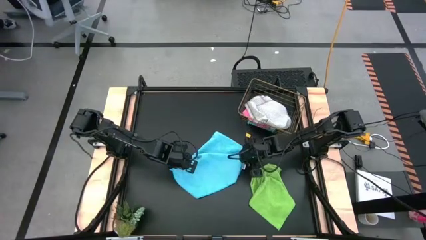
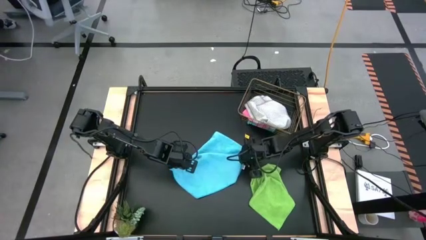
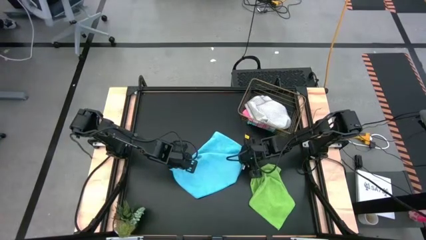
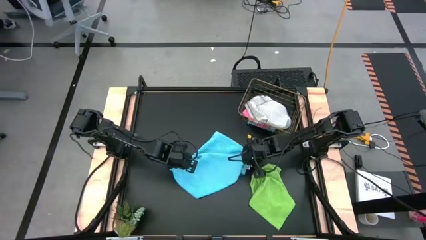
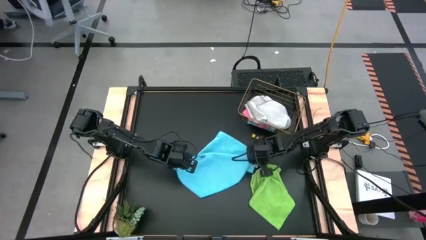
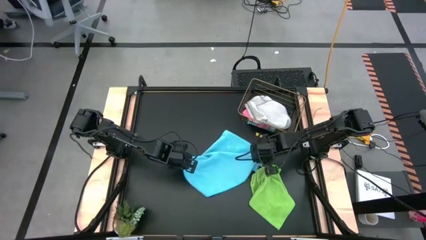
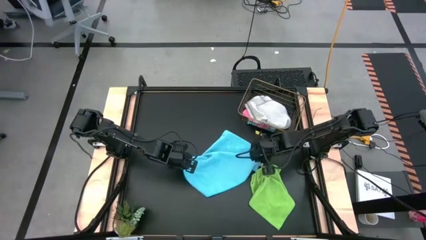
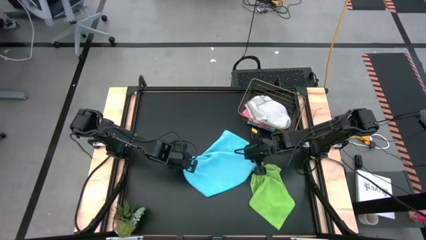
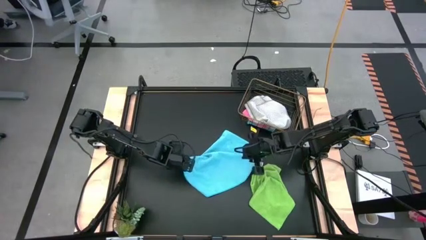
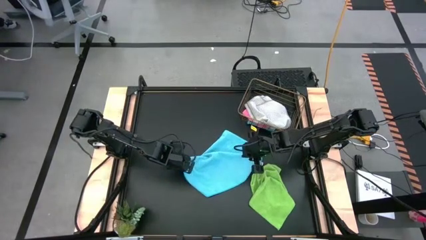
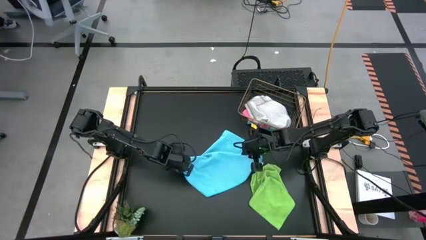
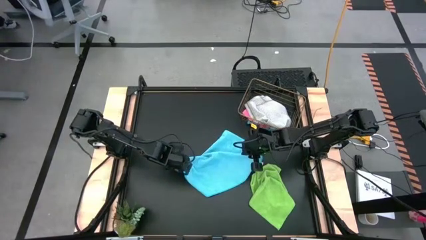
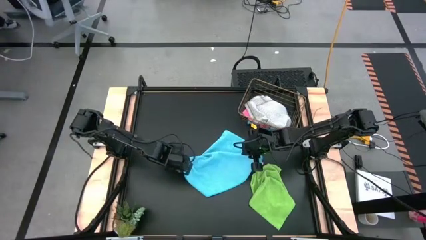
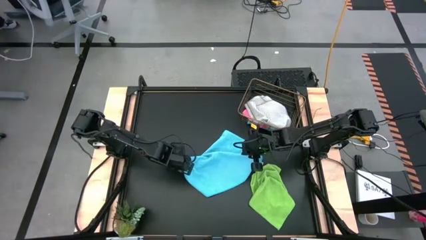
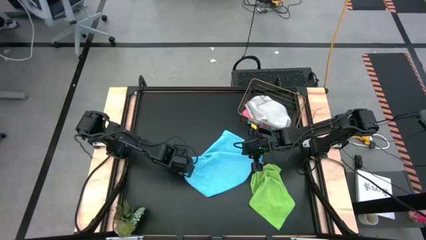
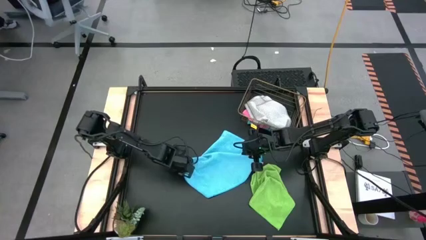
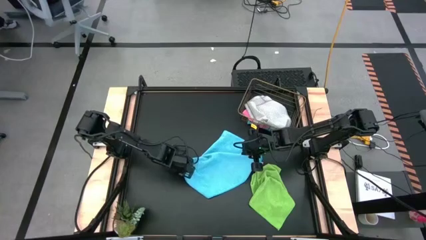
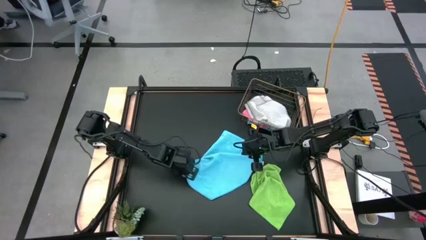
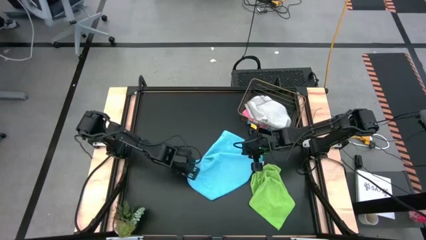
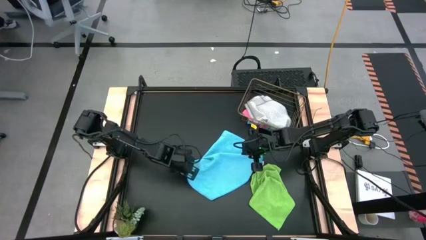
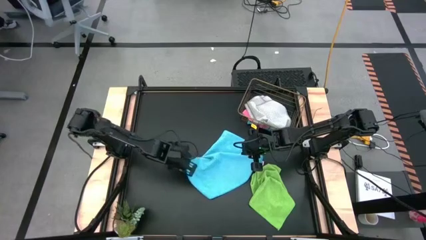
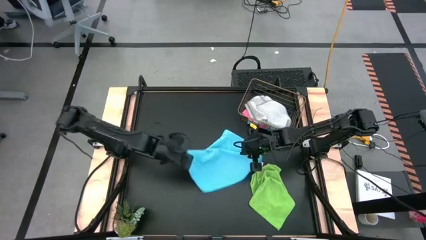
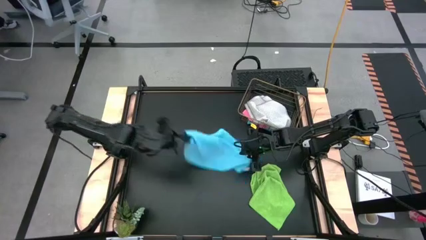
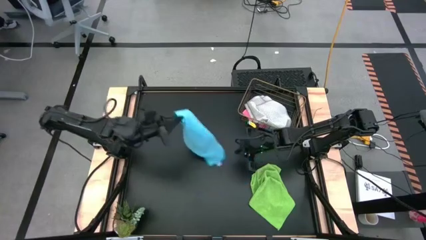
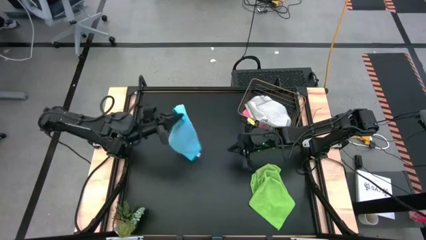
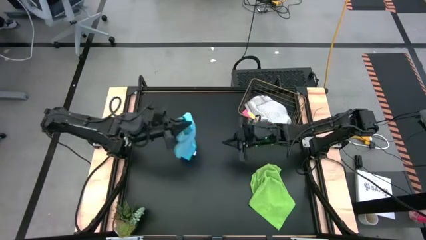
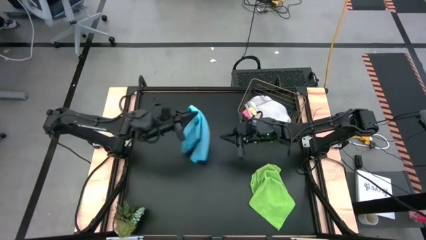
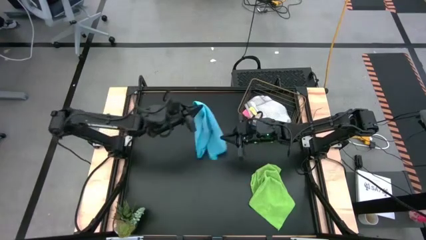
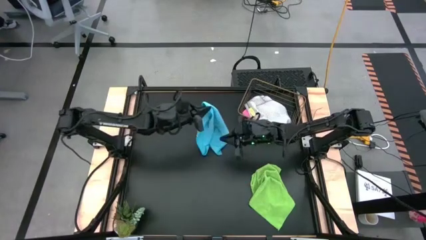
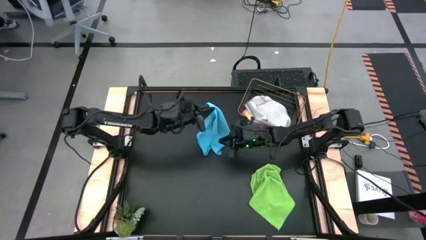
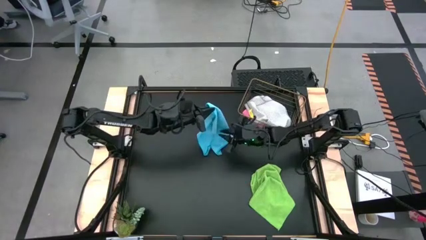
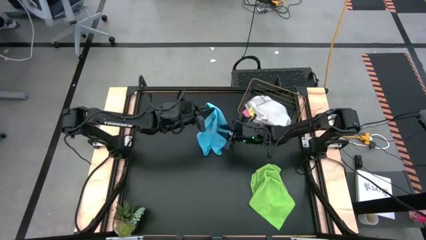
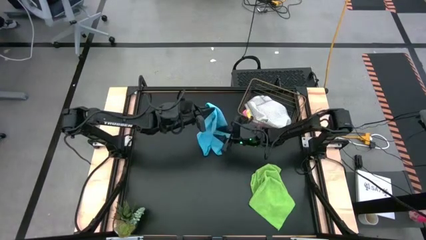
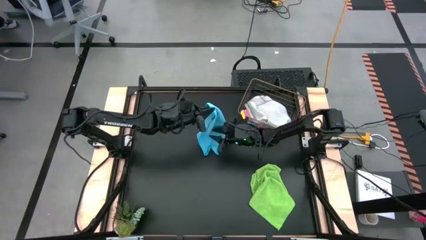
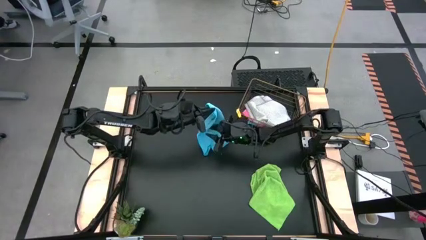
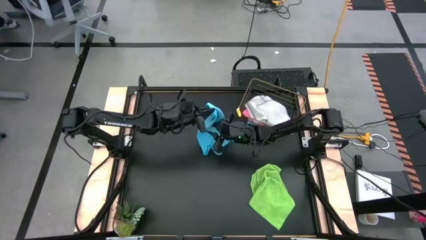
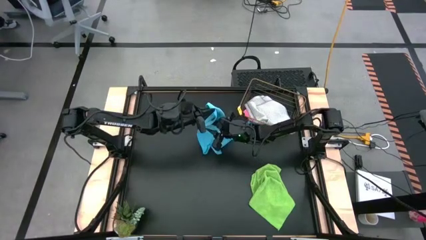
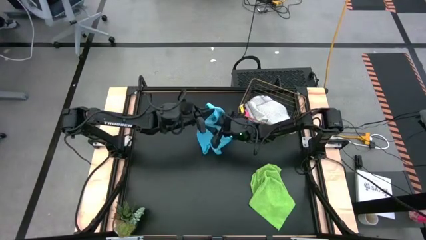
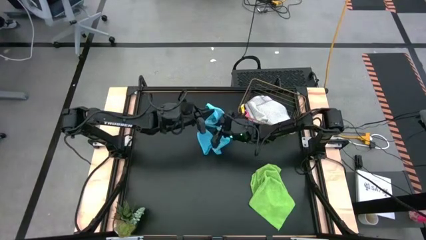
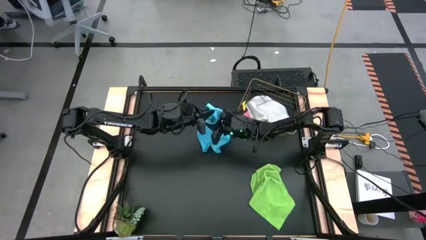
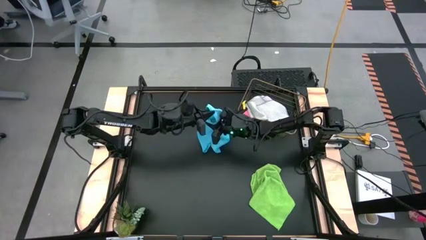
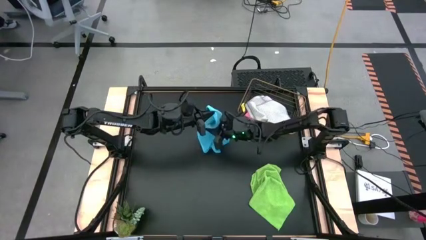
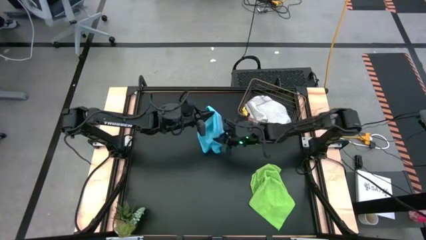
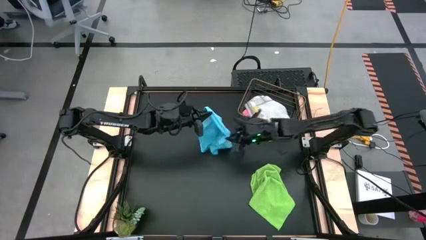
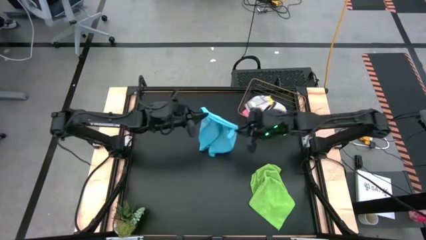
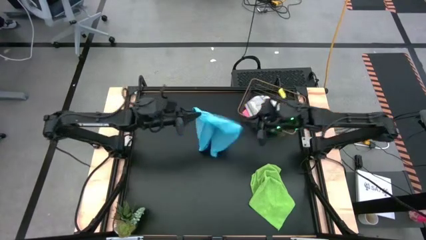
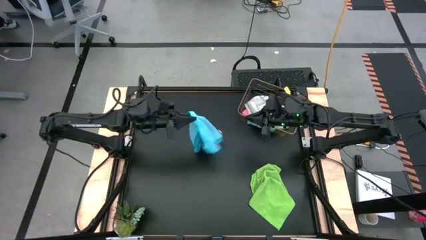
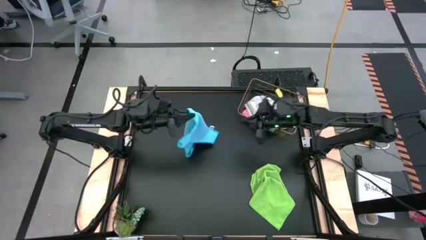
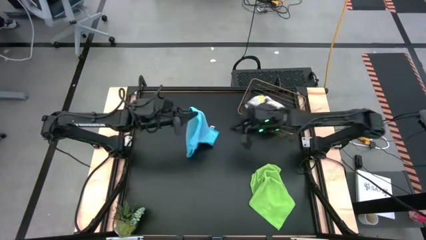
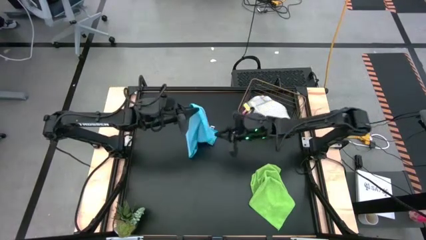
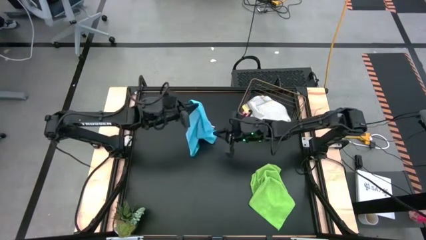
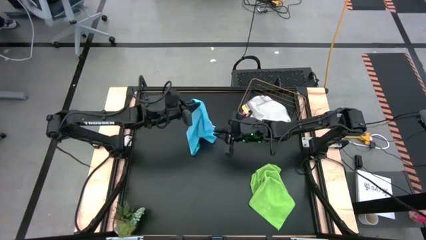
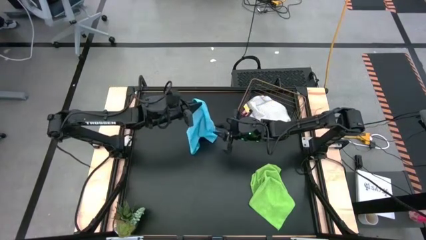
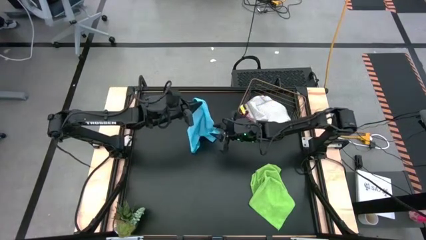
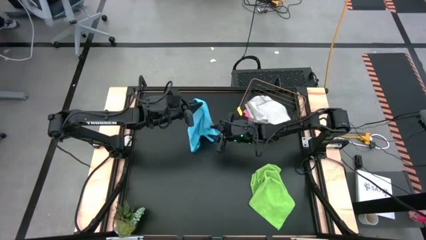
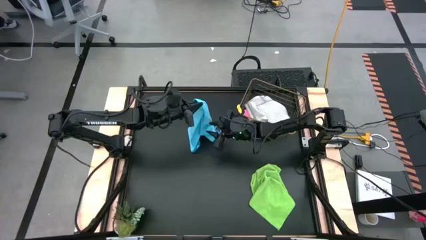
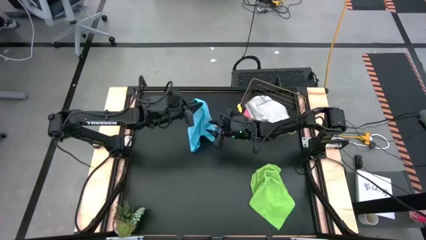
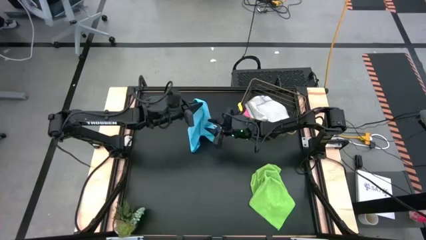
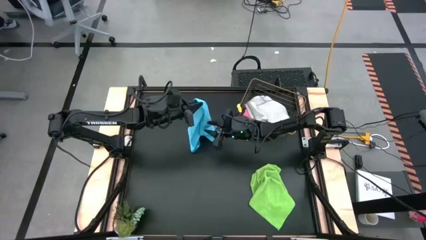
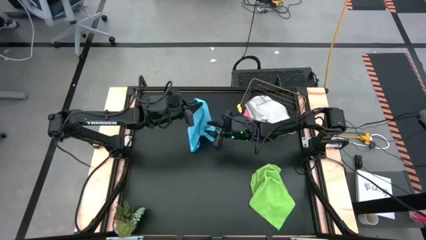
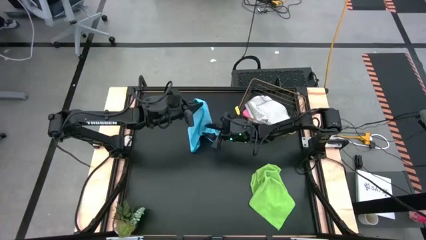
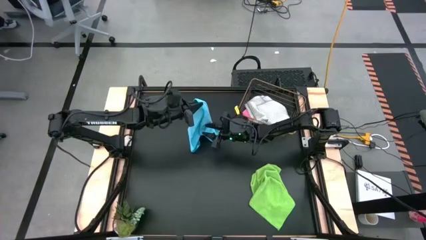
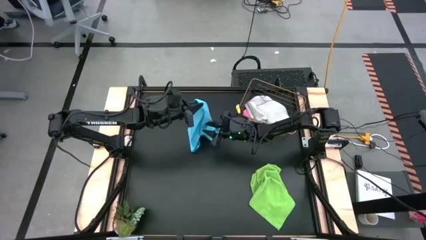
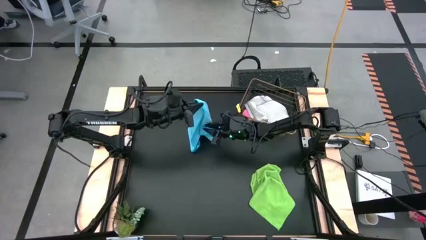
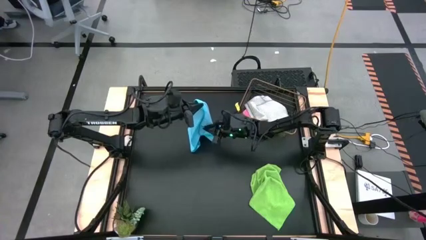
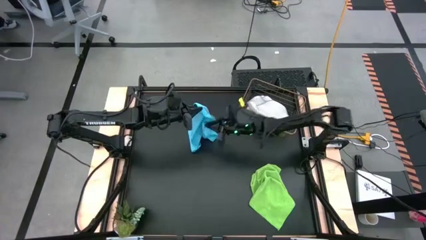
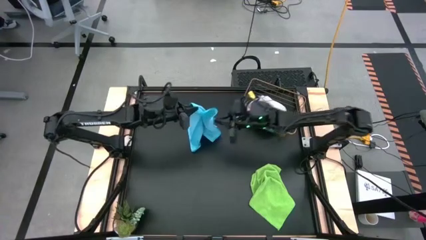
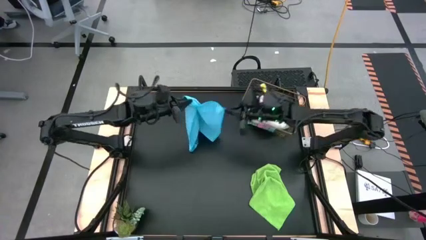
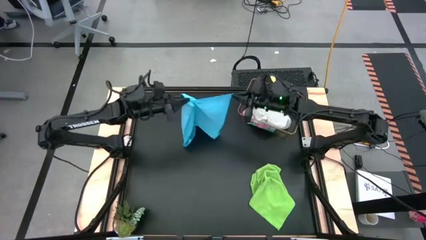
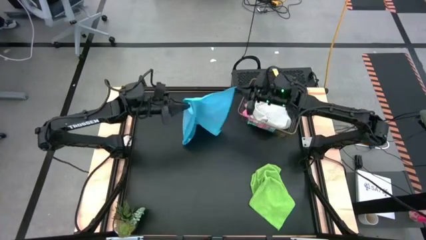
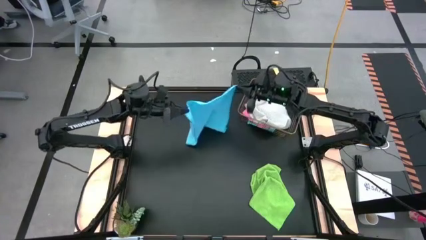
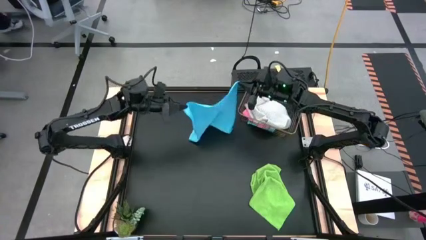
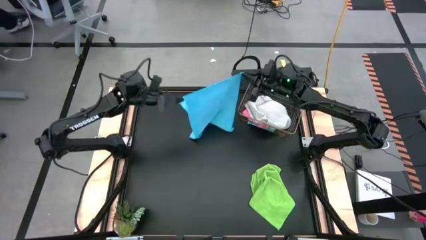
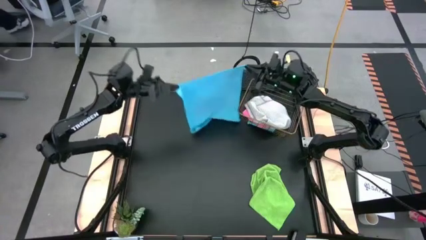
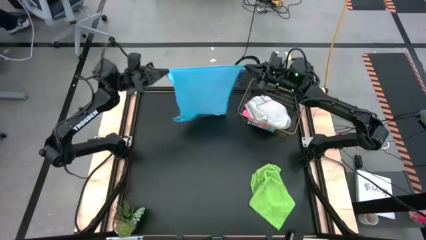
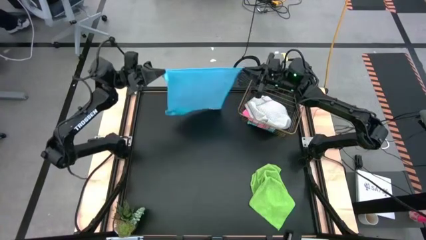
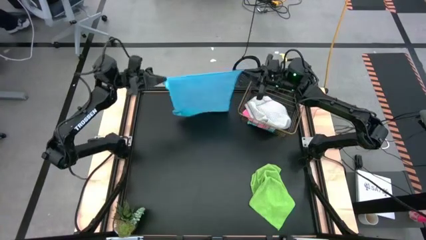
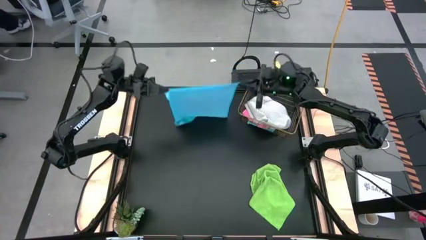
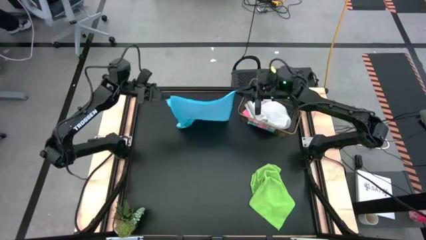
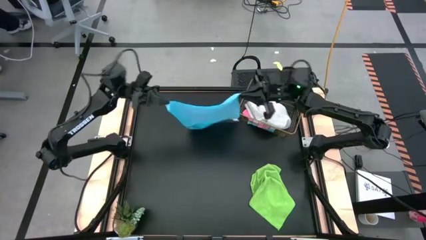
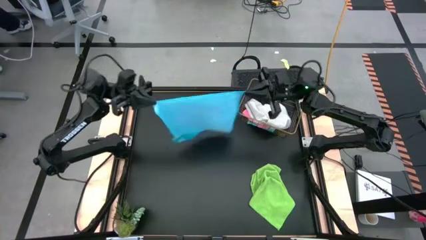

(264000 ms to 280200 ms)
Task: Fold microfiber towels
Fold the blue towel

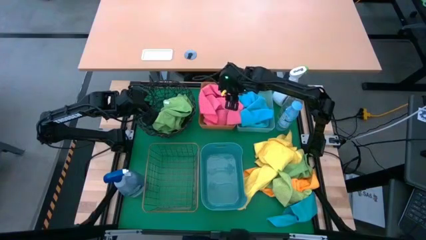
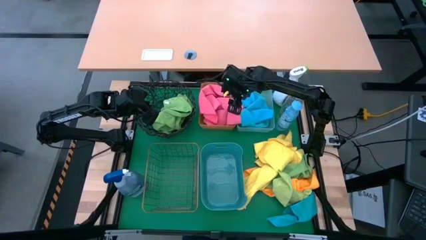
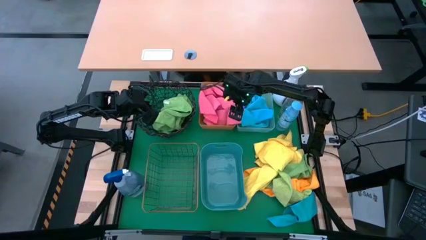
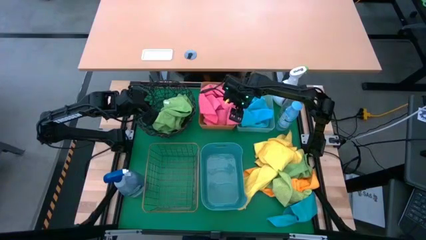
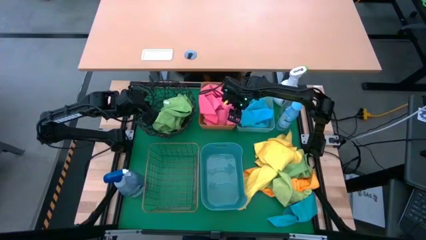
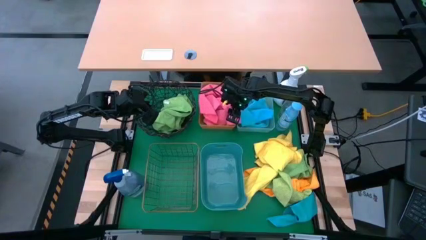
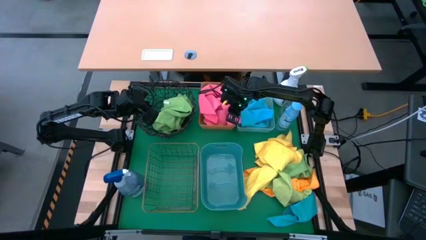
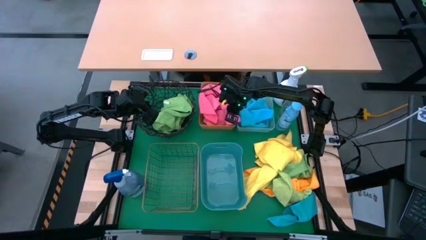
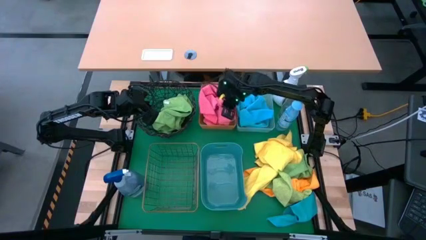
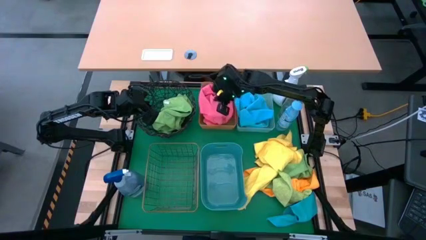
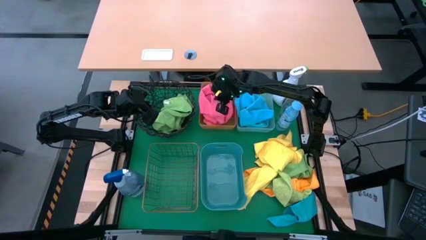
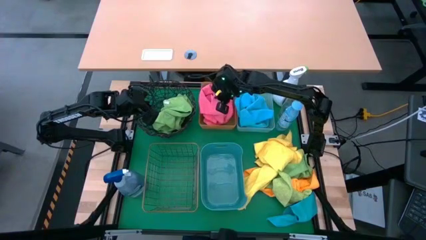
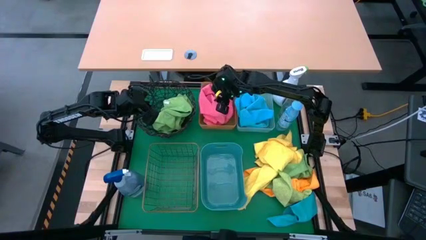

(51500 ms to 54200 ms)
Task: Sort microfiber towel by color & place in baskets
Adjust the pink towel in the orange bin
